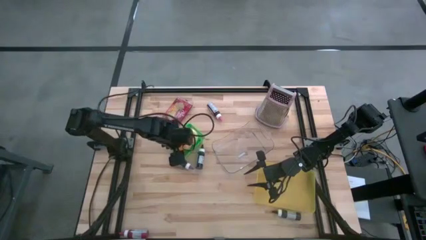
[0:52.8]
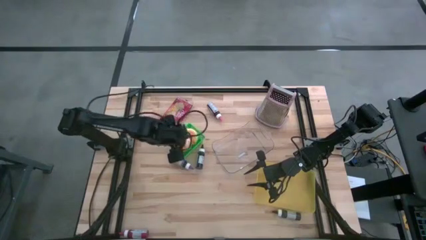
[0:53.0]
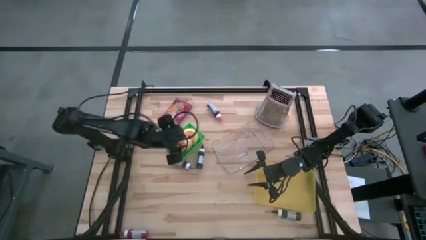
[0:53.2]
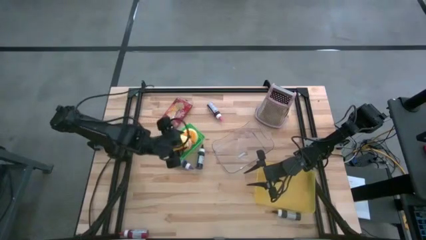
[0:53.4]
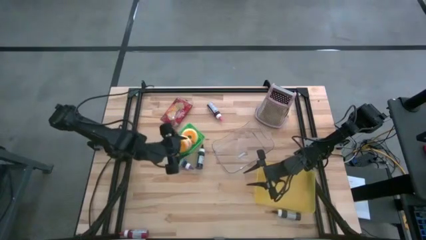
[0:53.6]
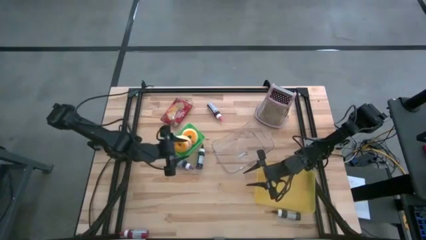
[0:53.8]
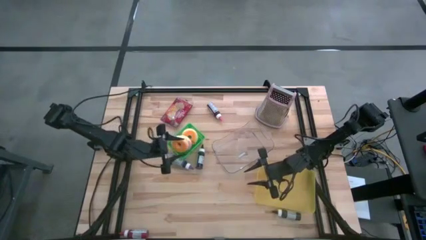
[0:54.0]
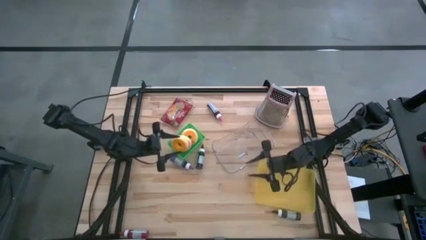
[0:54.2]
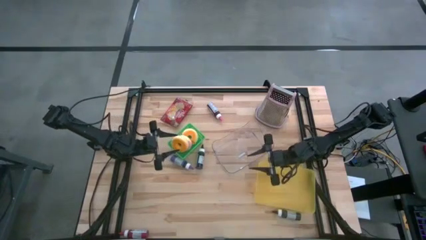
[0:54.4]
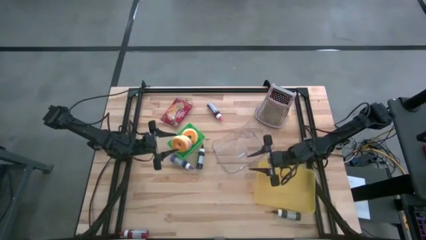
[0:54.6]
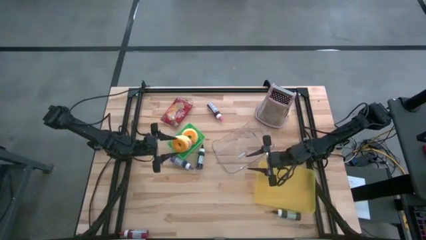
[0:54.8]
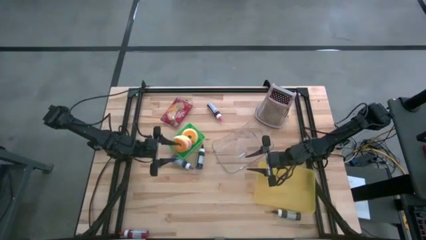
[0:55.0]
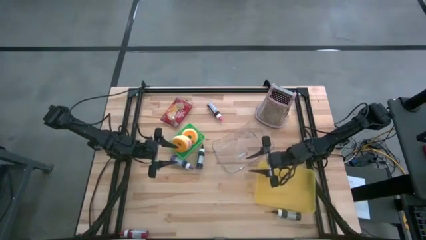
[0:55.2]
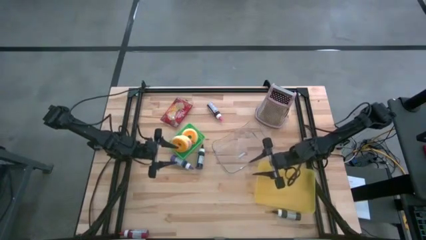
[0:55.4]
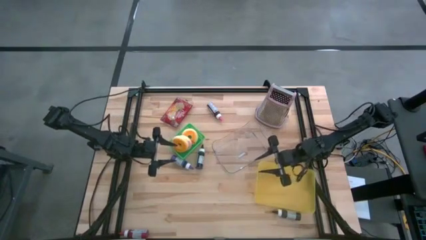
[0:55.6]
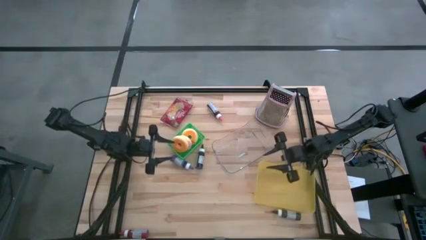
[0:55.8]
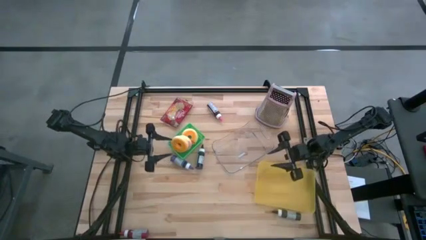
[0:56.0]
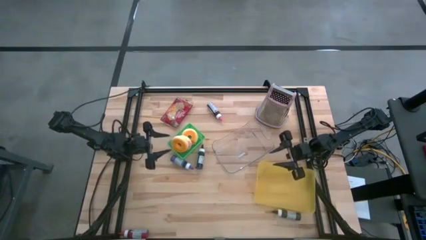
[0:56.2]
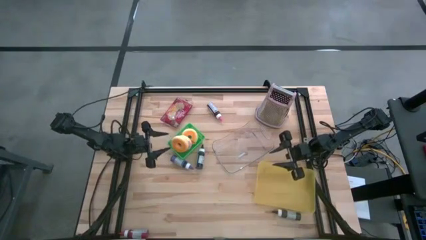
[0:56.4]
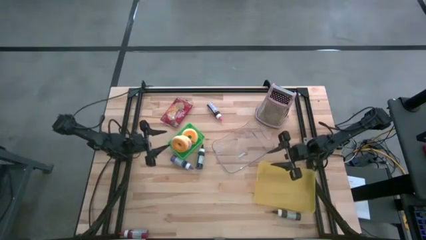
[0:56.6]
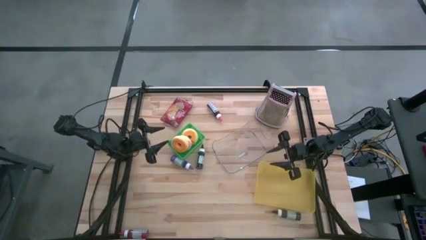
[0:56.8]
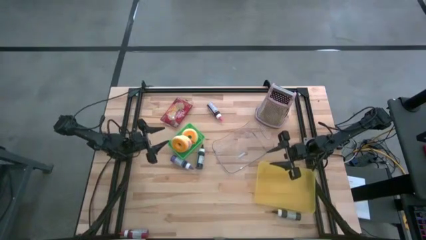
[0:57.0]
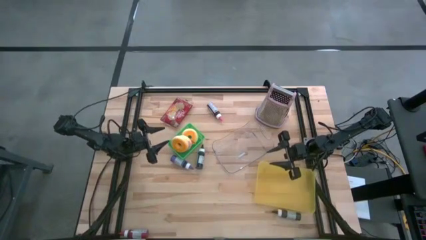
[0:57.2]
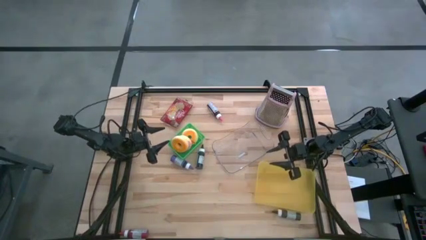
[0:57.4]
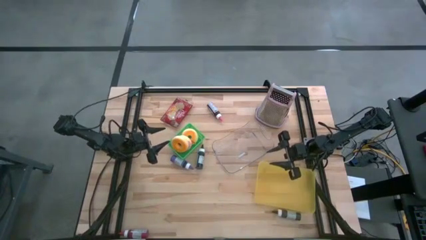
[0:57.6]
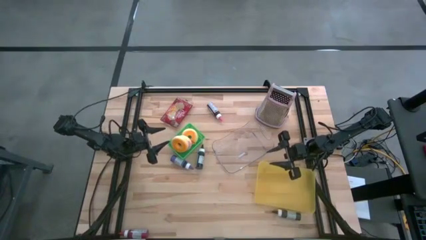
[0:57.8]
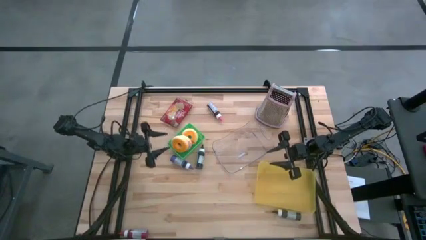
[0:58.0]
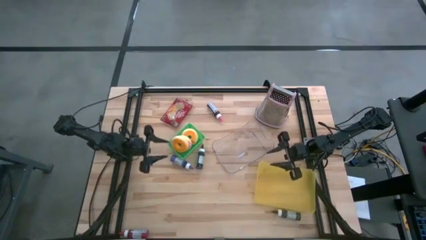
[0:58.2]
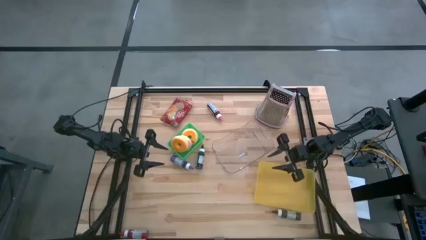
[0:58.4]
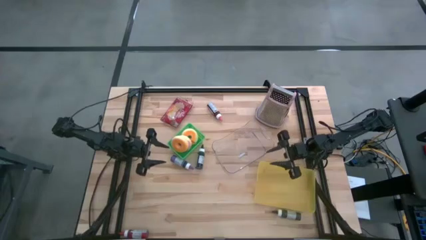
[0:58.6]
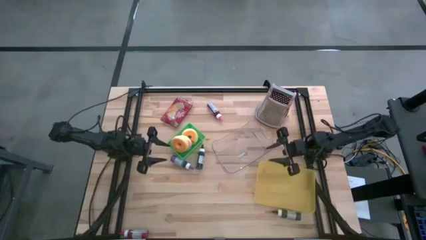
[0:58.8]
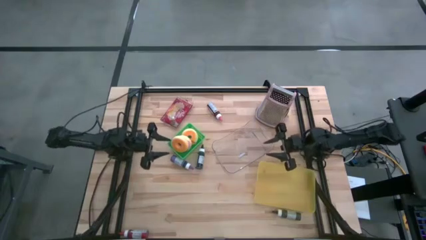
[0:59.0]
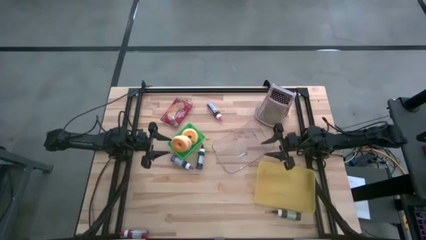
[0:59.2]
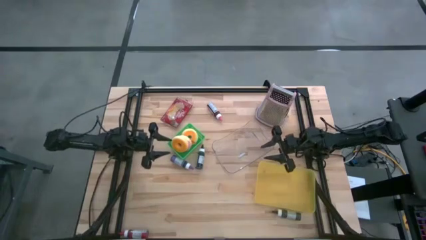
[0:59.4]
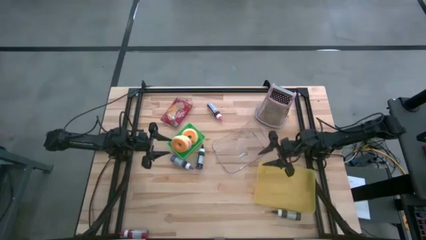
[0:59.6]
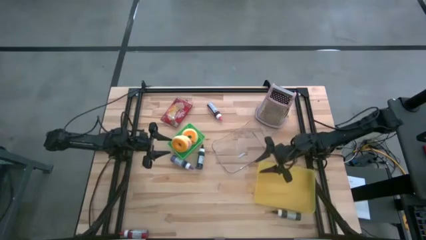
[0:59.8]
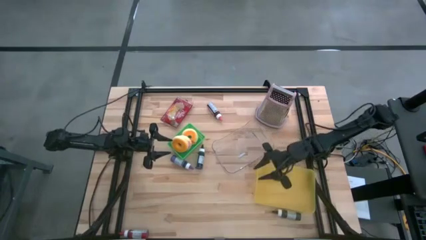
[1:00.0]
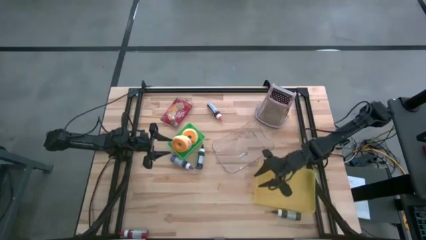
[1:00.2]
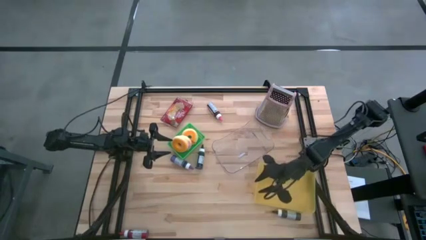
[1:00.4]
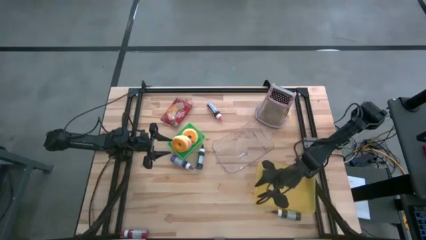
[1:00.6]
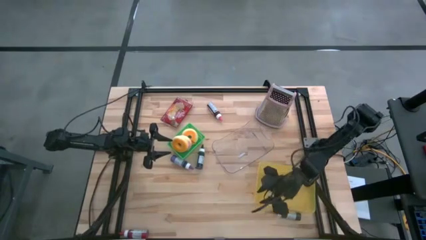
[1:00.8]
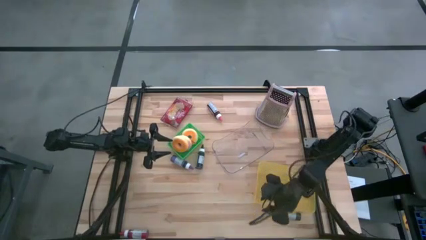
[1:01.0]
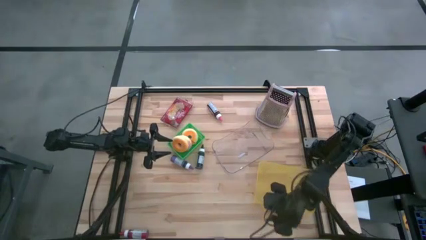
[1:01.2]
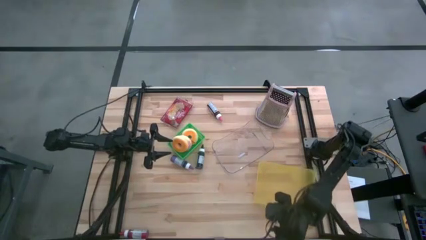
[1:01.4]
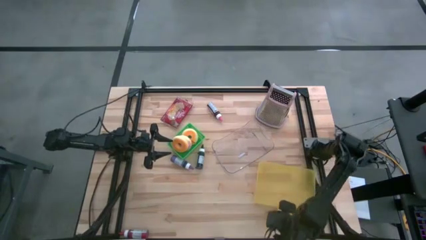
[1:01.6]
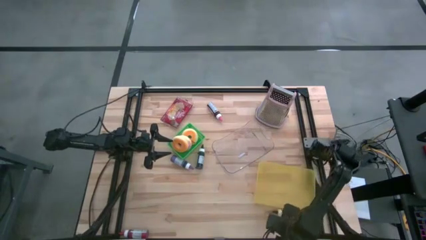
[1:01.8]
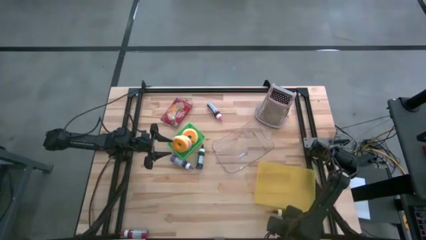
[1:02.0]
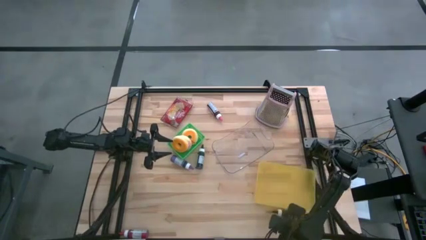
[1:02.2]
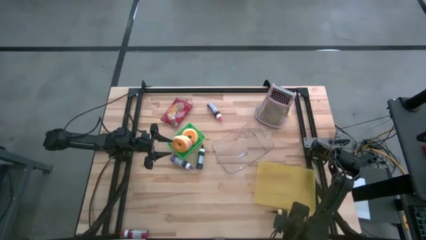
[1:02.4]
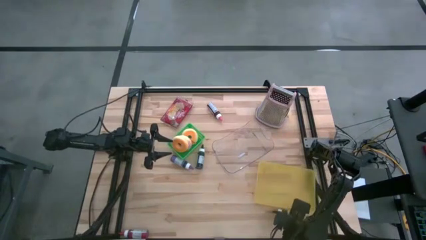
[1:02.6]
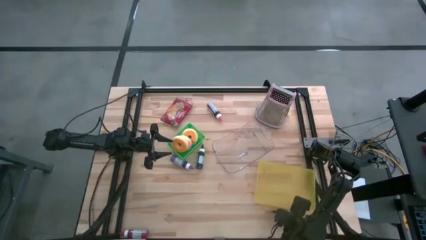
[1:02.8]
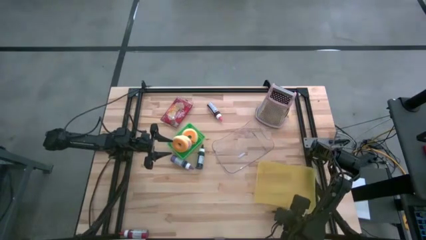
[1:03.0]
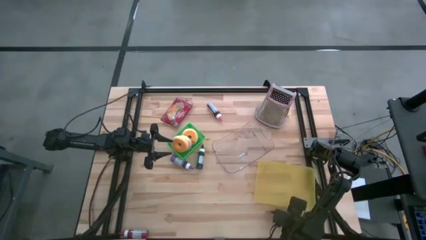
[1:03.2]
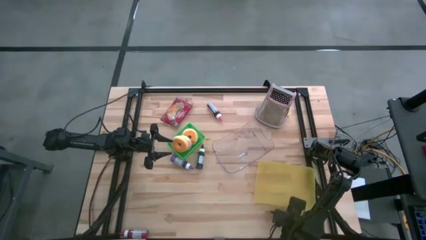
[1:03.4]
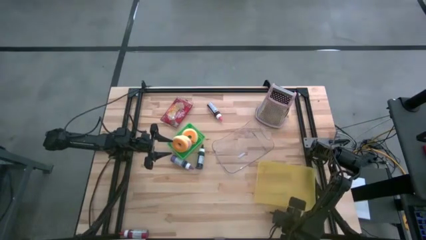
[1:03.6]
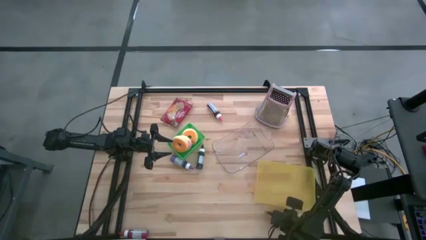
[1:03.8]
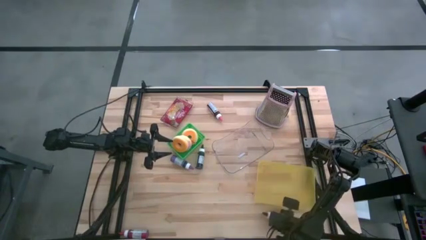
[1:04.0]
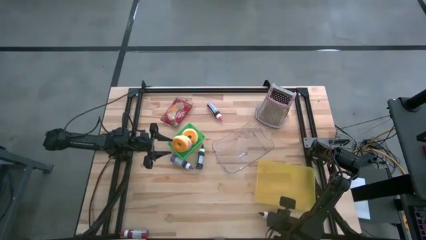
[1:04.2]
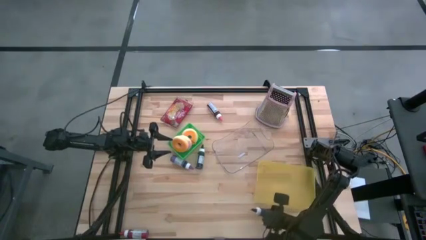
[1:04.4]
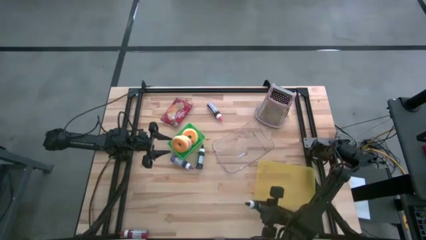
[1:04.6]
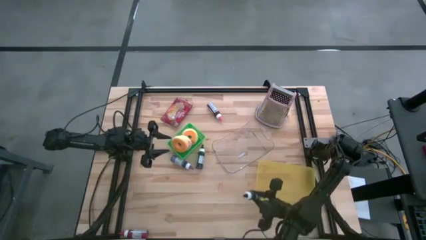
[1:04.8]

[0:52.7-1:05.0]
Task: Pick & Place Food Item
Put the bottom black food coloring bottle into the transparent bin

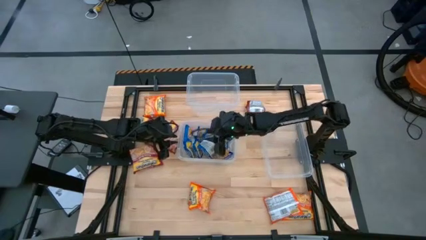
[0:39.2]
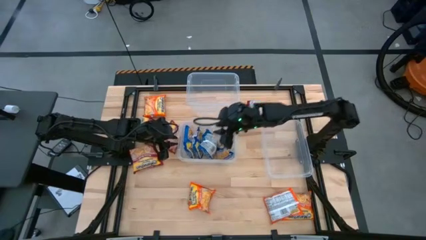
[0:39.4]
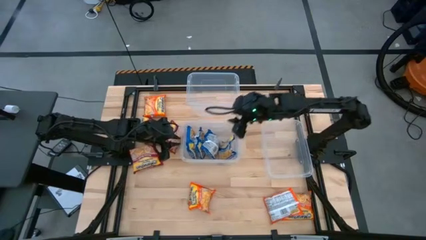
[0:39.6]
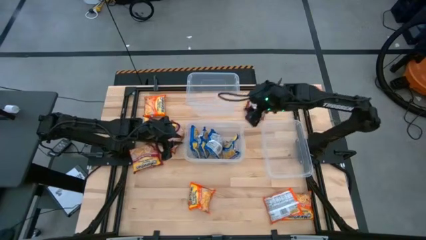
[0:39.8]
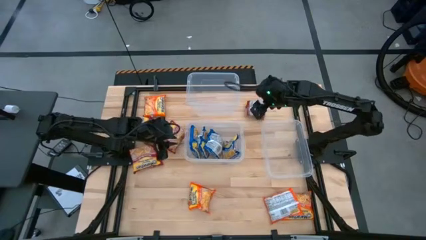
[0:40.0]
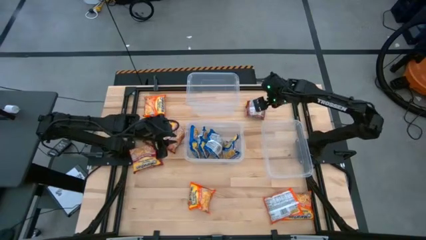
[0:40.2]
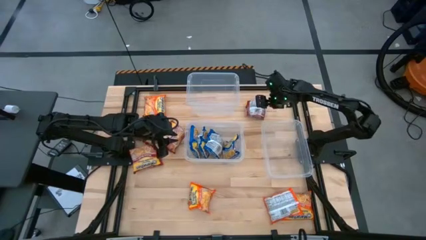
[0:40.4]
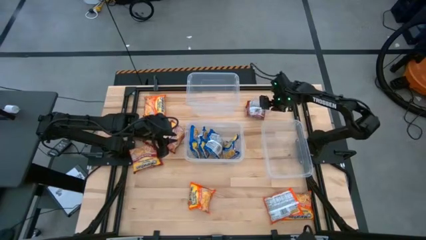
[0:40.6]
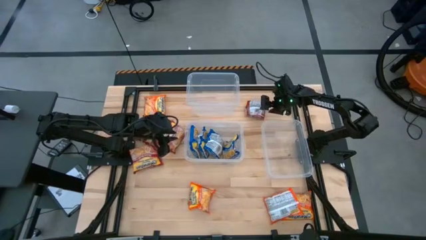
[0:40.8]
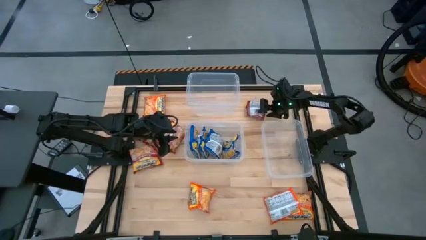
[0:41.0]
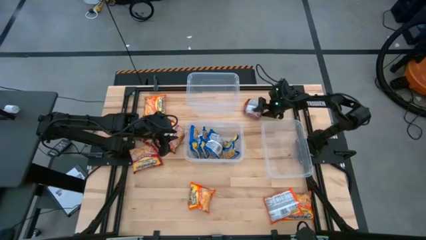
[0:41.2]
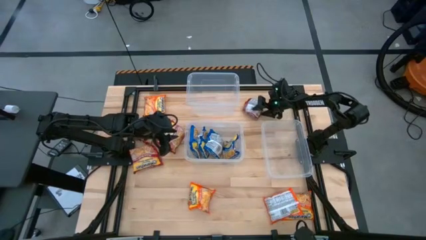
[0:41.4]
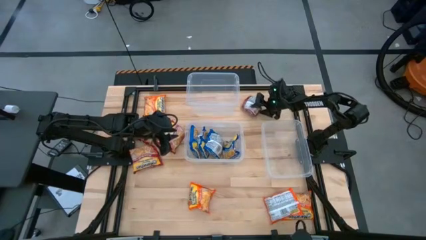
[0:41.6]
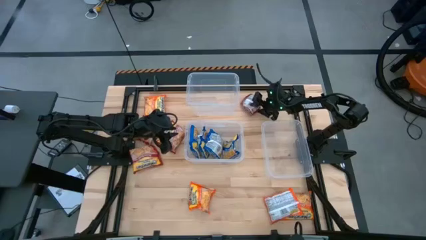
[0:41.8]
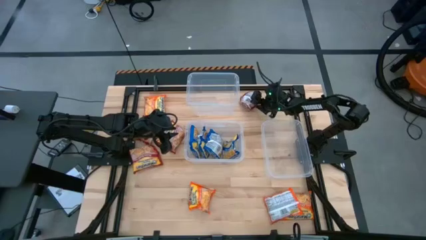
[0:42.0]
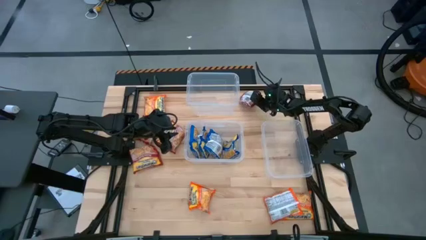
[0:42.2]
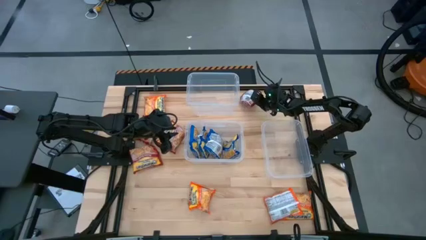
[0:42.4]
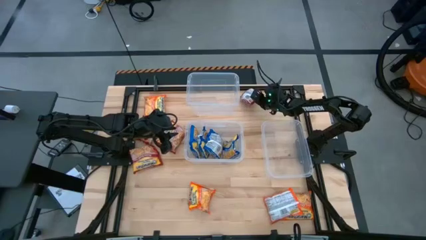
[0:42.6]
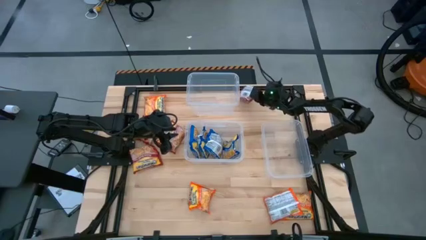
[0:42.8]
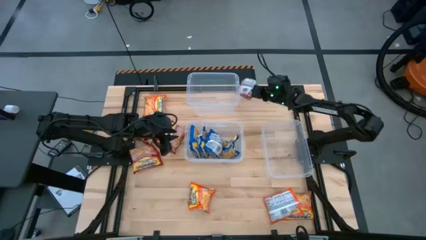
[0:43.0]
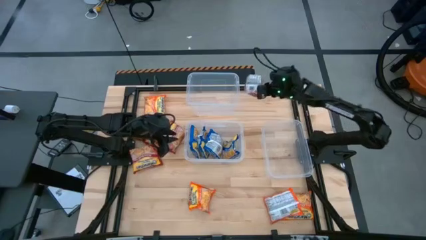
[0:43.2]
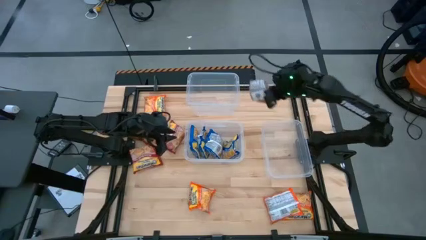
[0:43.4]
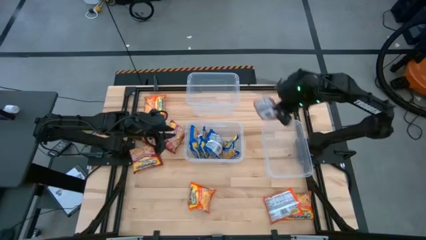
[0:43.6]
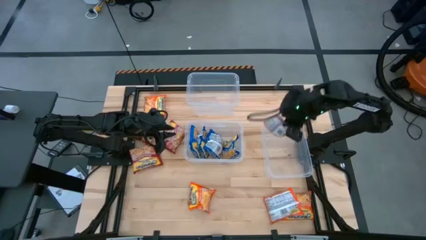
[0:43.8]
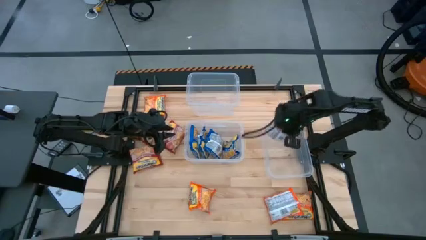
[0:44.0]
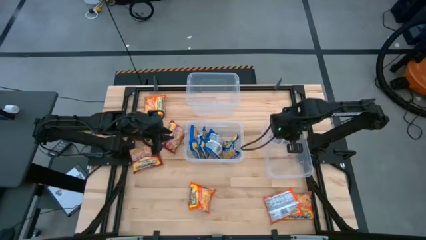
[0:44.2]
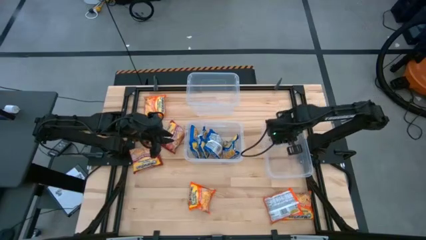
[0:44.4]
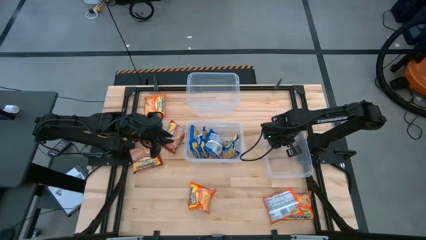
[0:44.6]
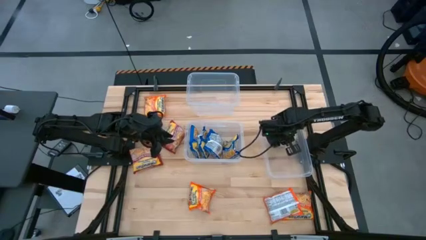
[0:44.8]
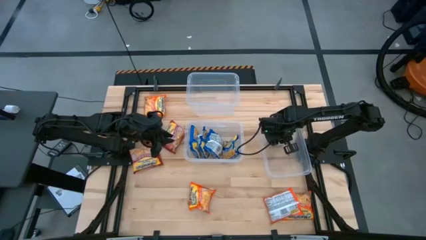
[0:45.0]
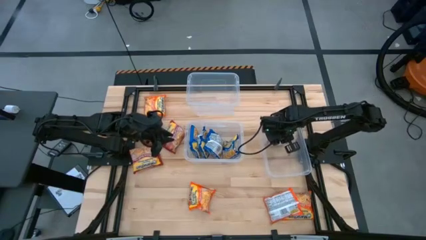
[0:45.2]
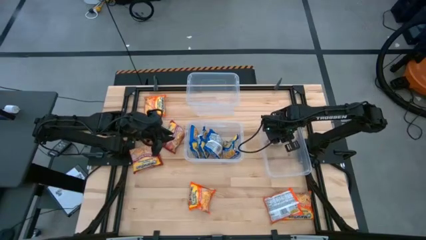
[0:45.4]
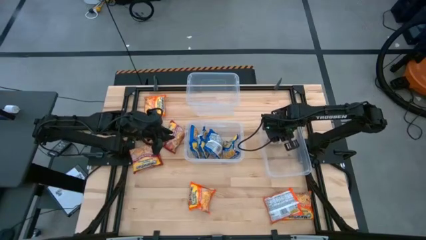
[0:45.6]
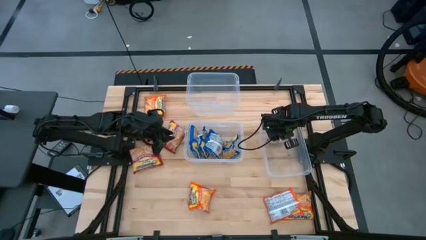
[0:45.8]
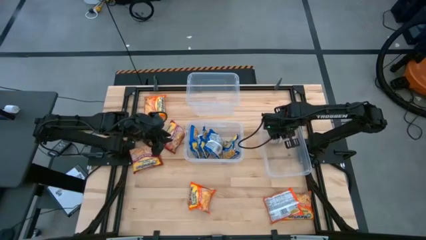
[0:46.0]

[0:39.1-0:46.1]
Task: Sort Maruchan noodles
Put the red noodle pack into the bottom right transparent bin
